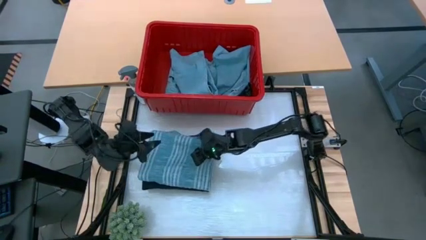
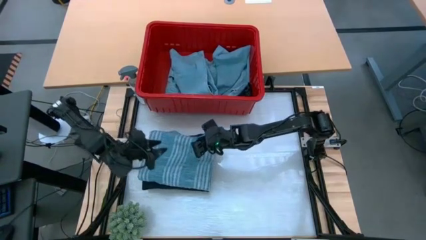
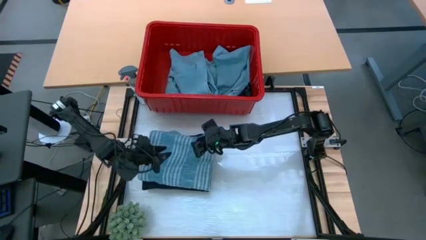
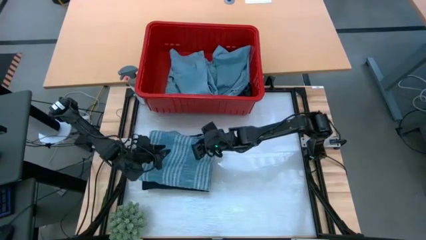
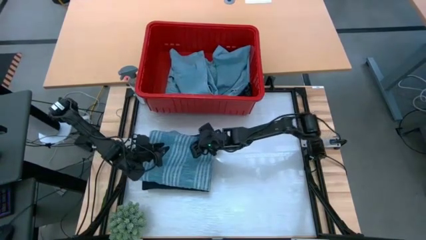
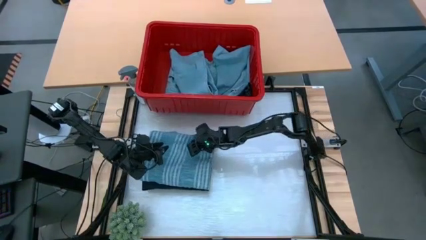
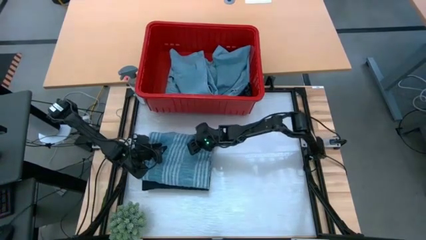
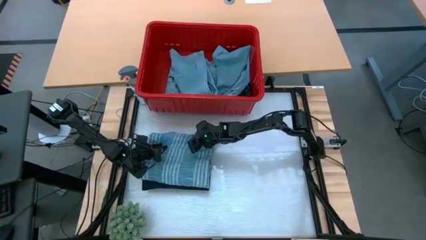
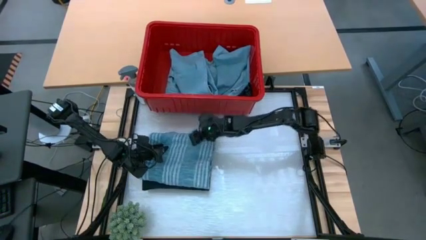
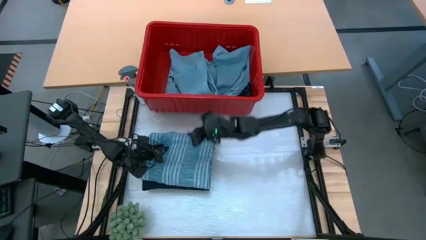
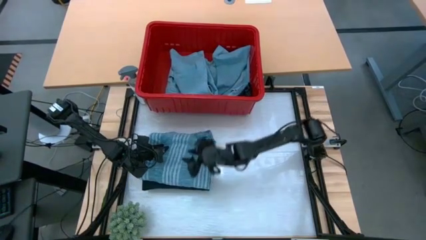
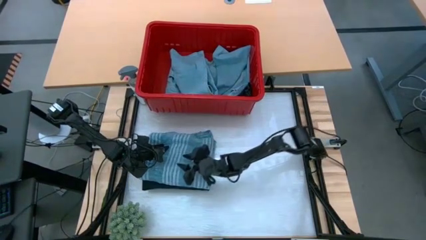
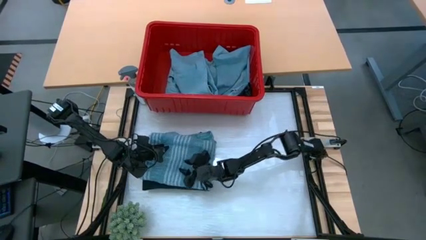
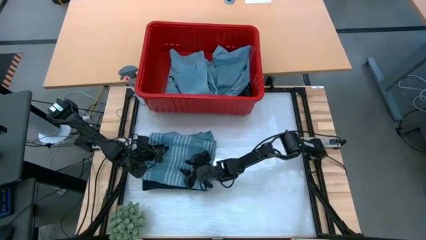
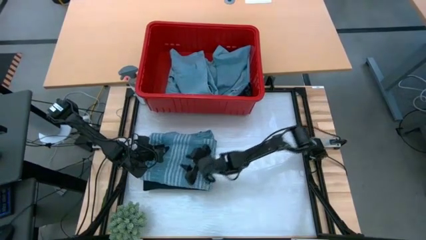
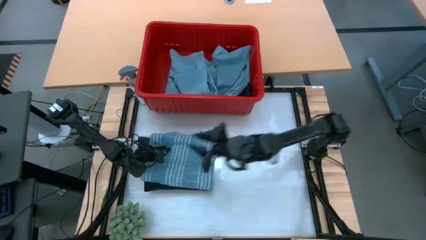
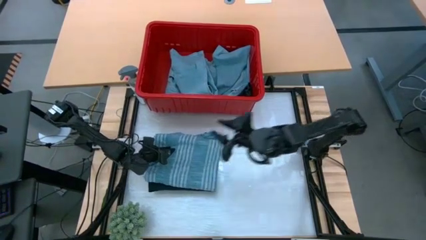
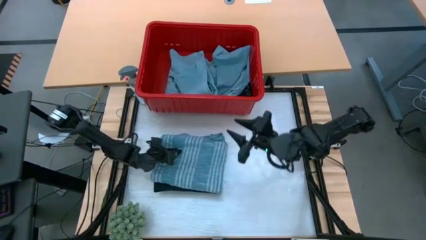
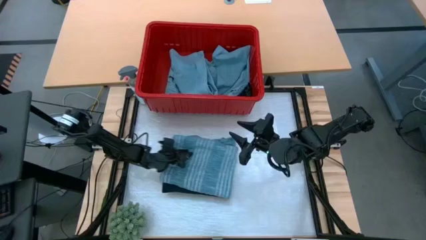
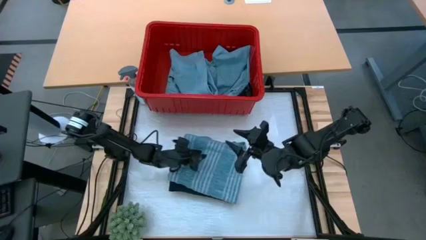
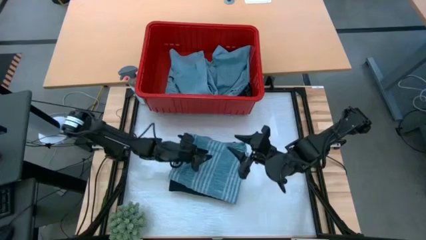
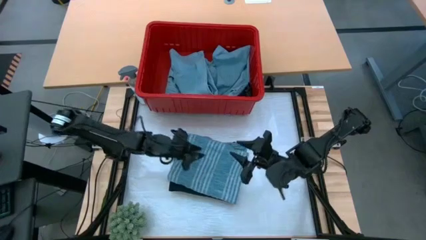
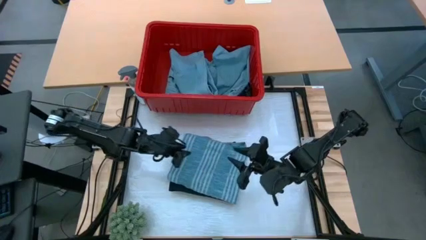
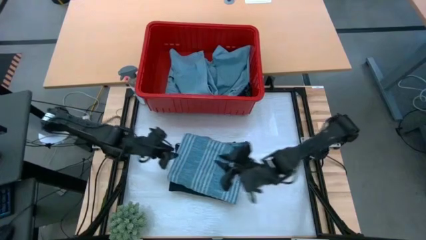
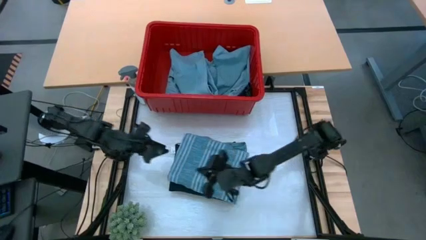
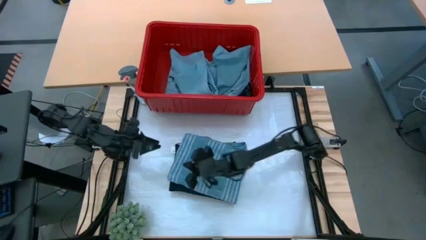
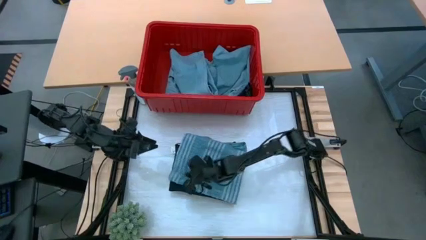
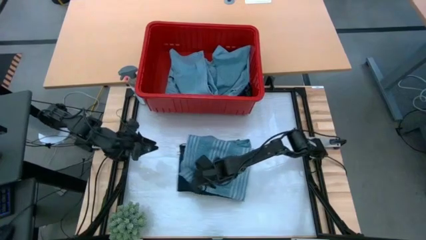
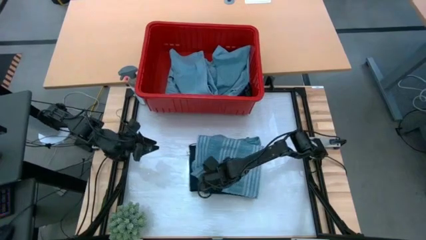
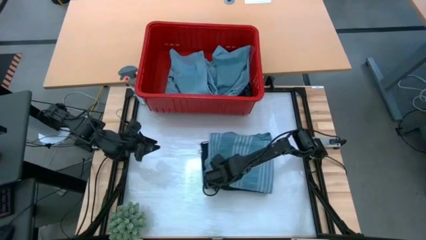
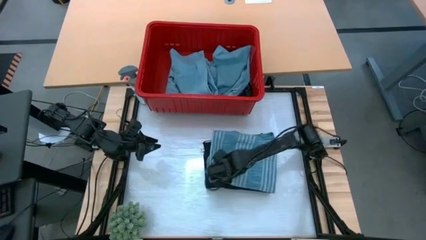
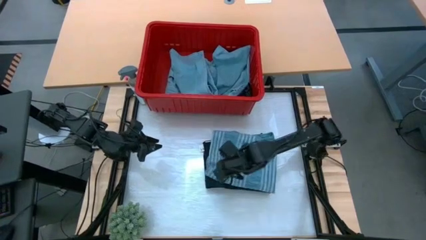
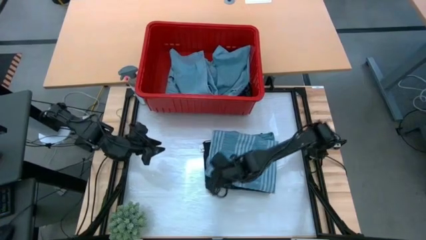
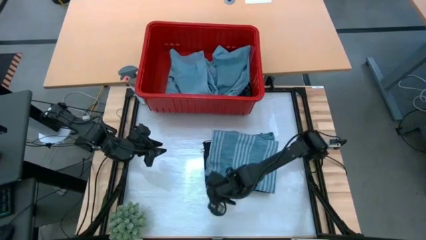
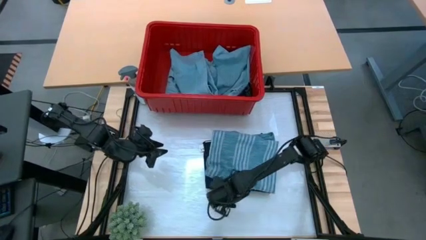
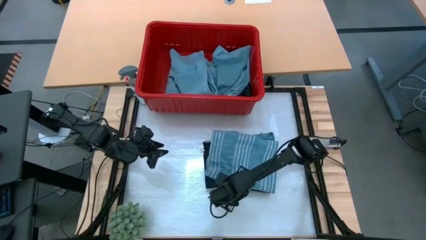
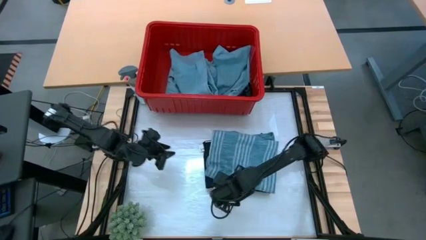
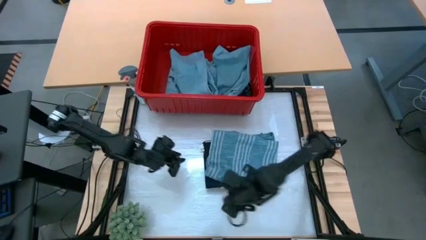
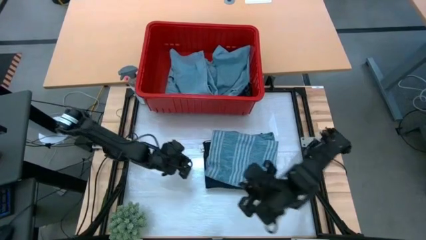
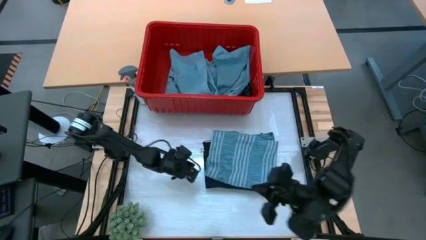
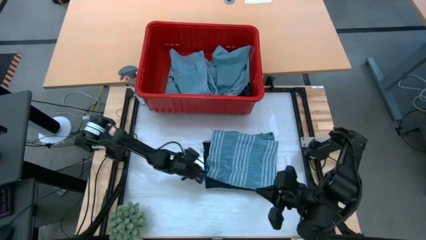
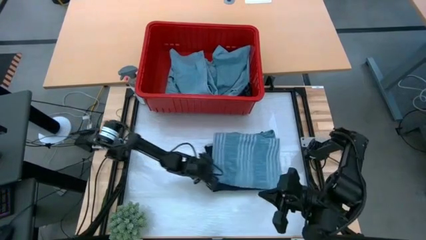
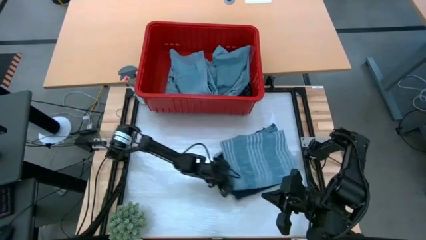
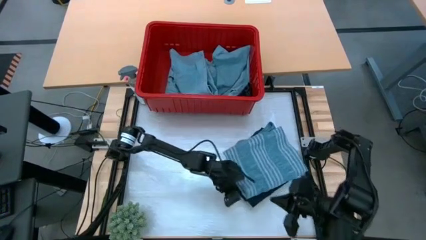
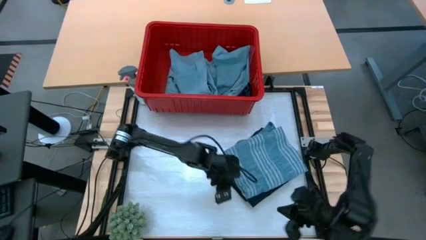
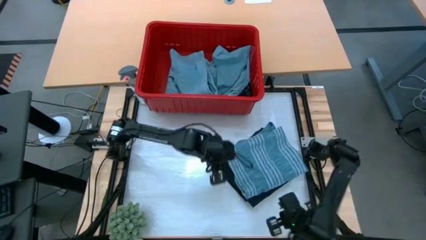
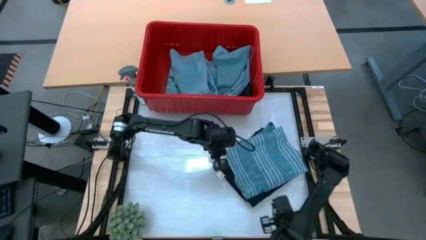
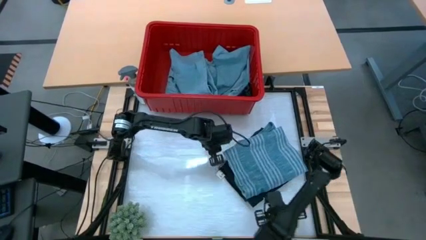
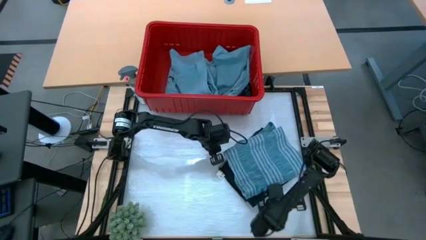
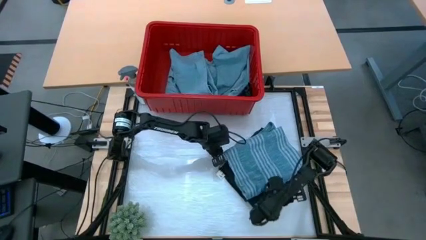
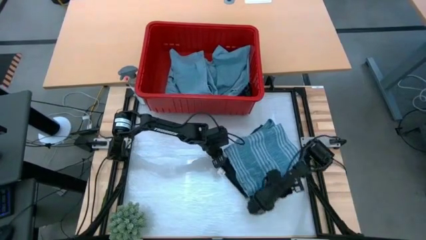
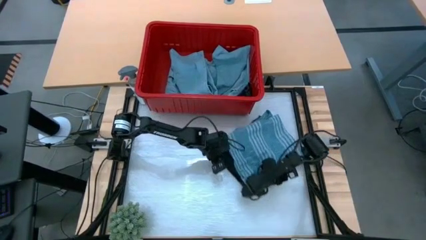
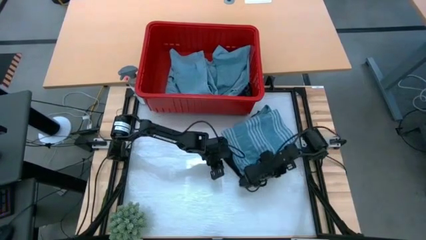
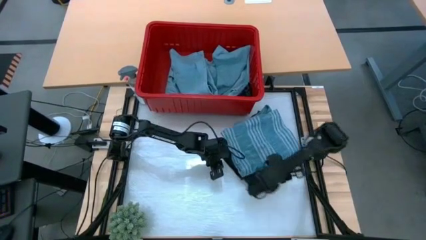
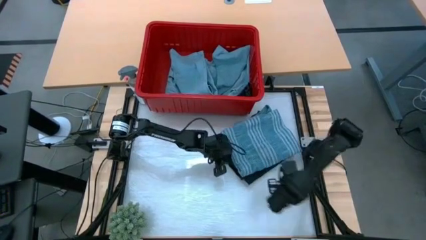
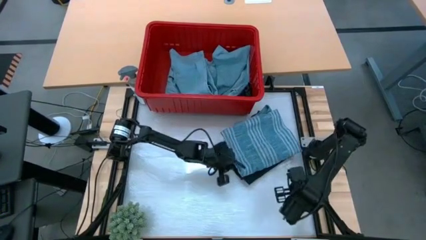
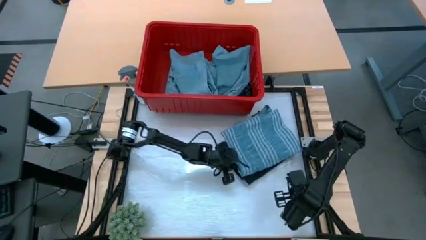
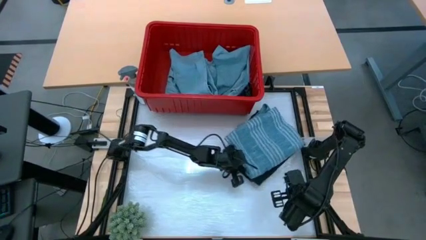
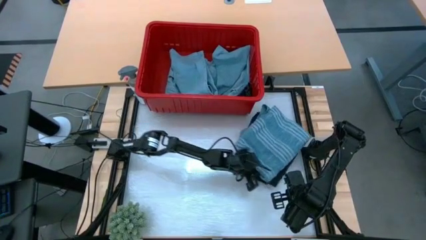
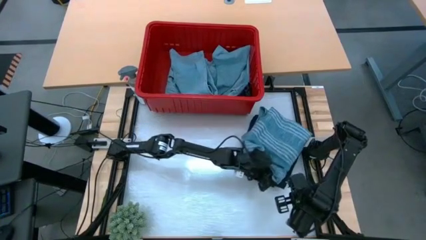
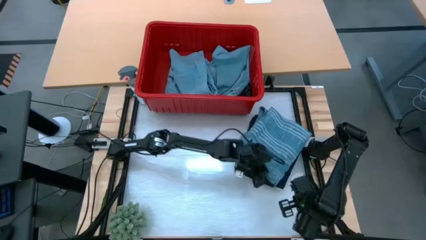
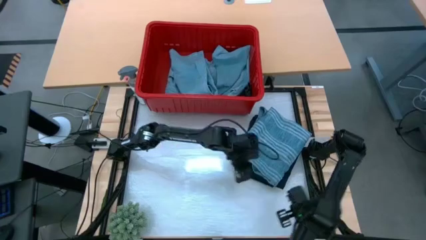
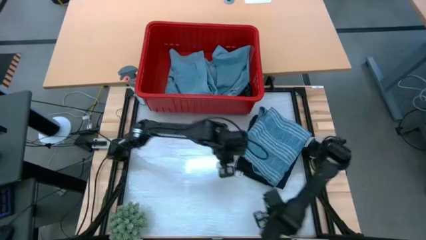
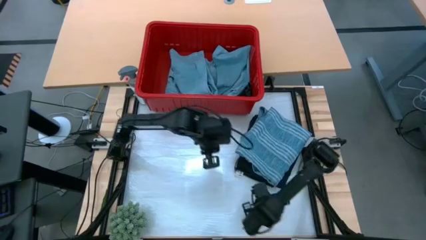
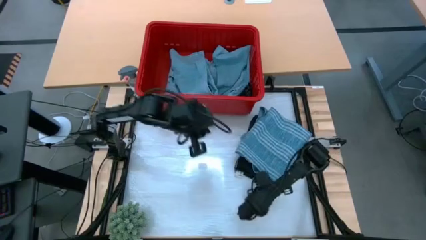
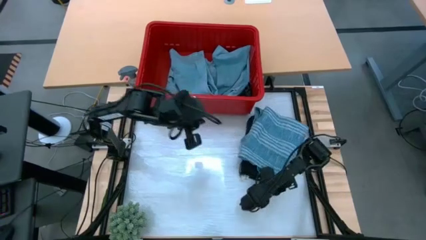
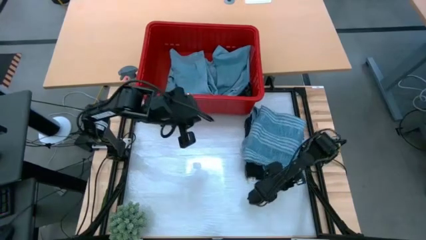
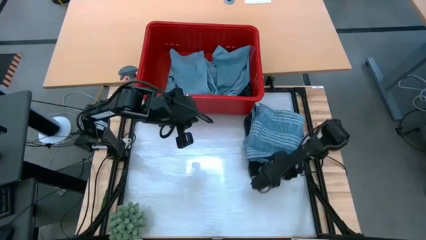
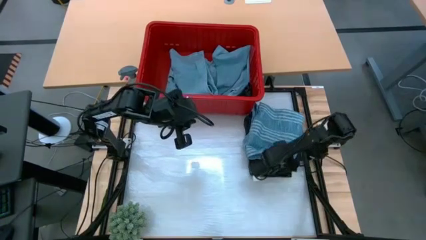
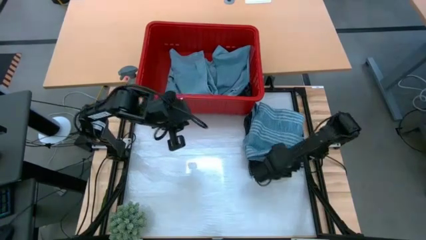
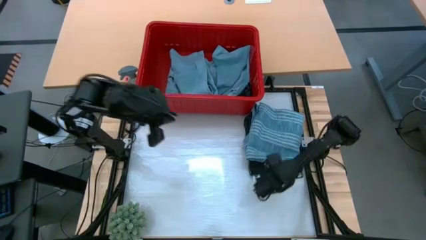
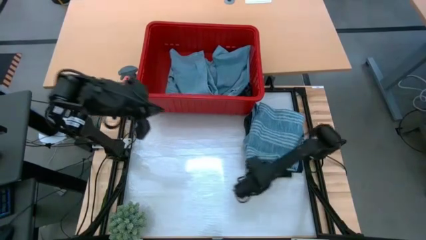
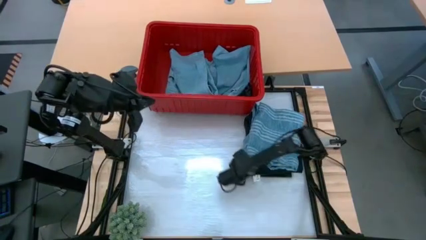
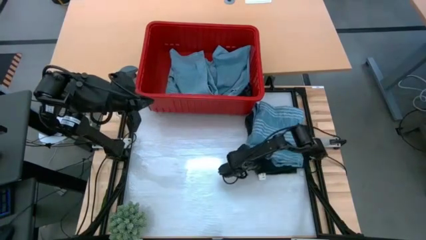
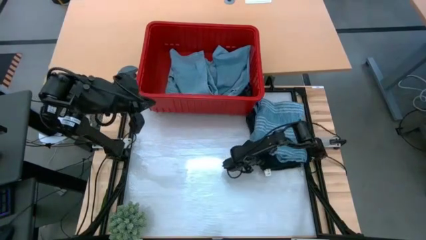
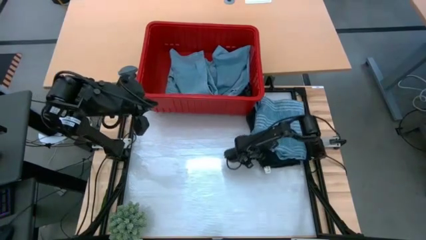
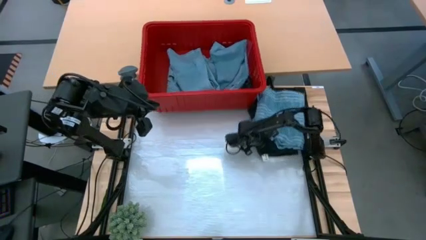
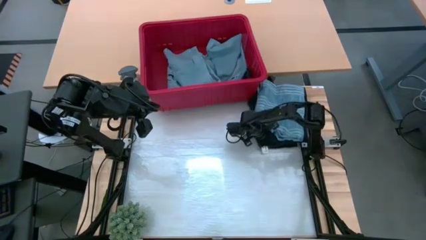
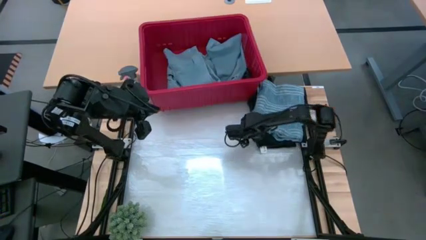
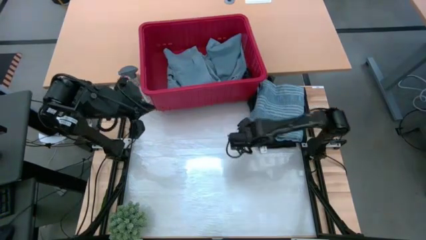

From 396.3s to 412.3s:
Task: Fold Laundry from Bin
Stack the folded light blue shirt on top of the folded black pants
